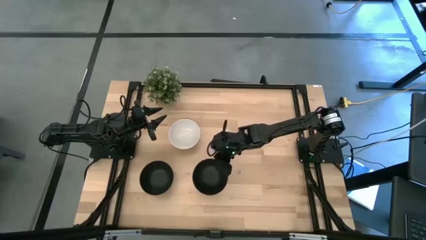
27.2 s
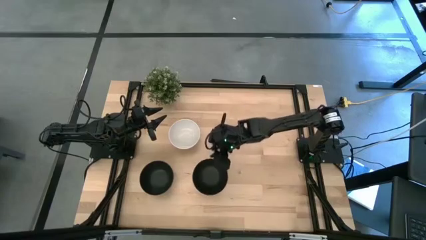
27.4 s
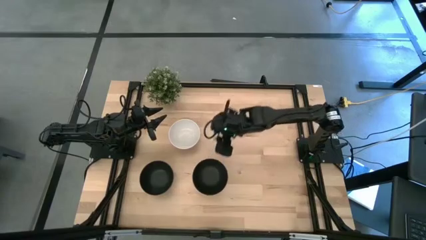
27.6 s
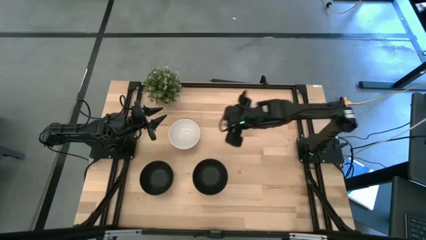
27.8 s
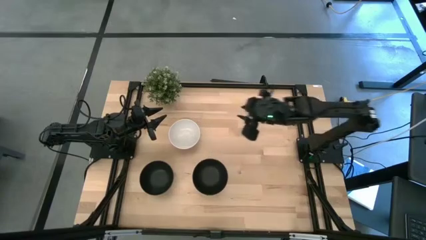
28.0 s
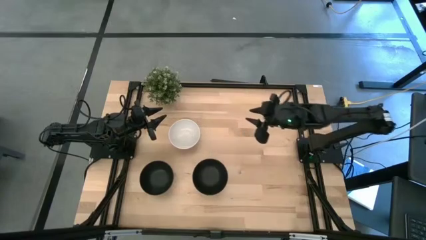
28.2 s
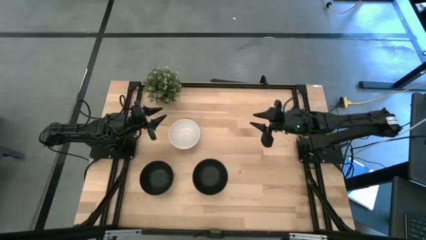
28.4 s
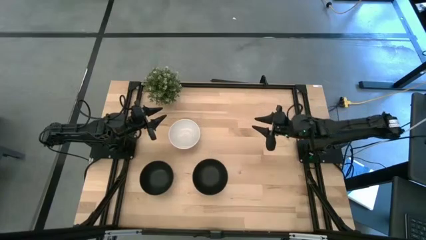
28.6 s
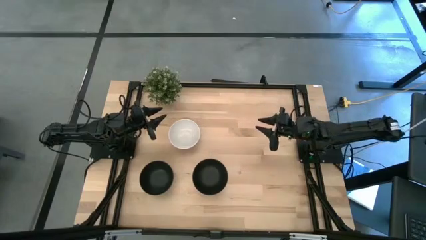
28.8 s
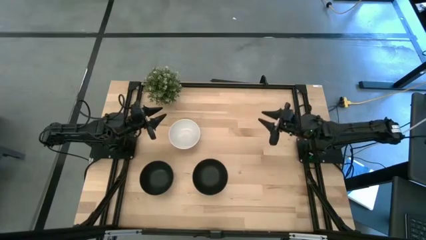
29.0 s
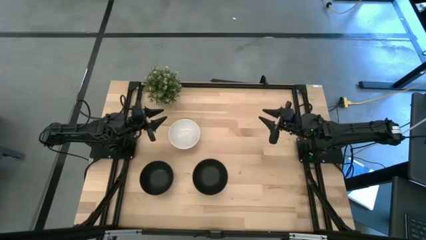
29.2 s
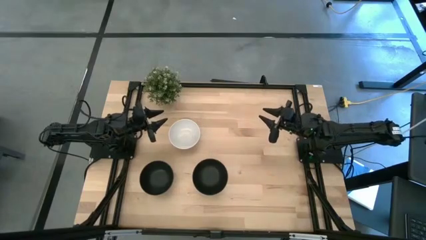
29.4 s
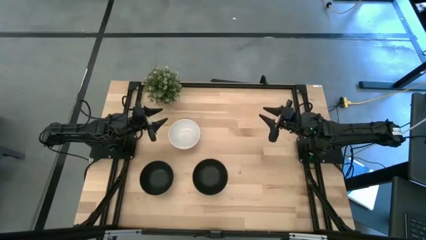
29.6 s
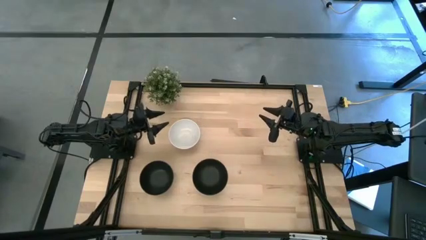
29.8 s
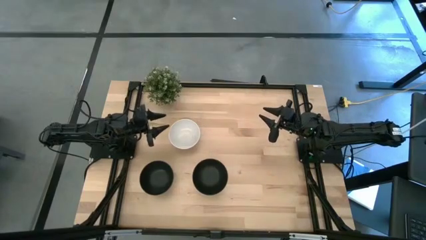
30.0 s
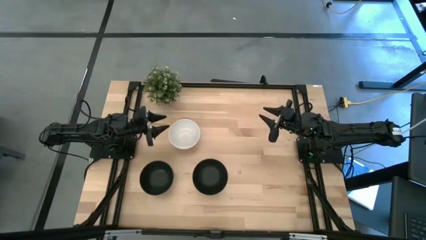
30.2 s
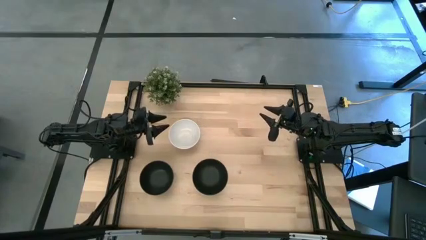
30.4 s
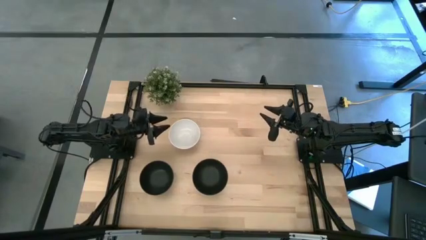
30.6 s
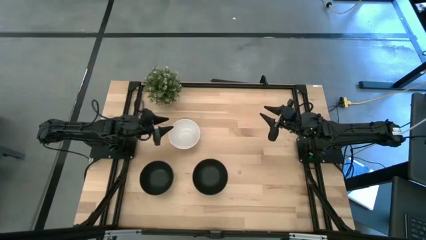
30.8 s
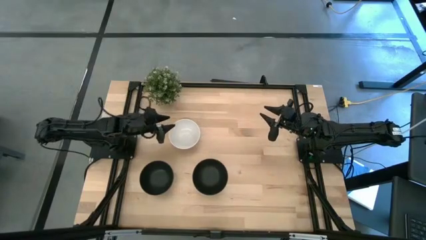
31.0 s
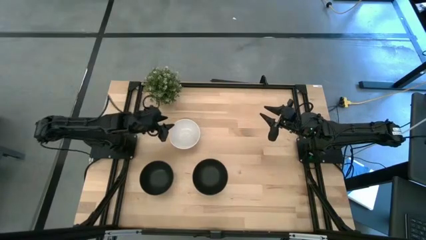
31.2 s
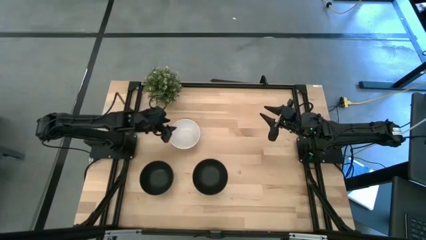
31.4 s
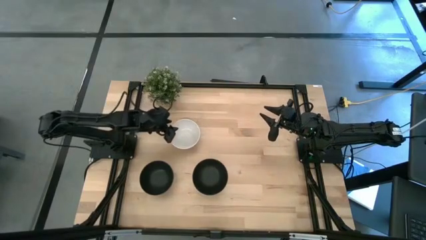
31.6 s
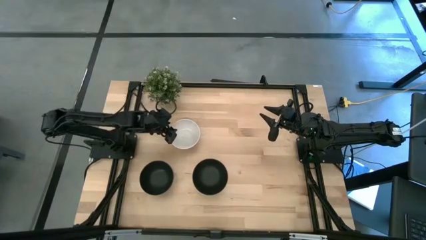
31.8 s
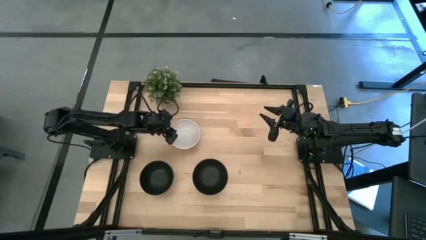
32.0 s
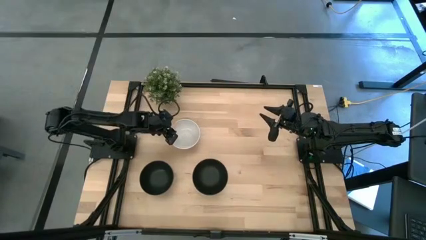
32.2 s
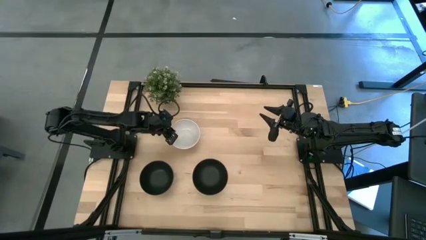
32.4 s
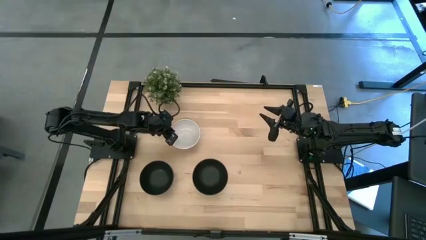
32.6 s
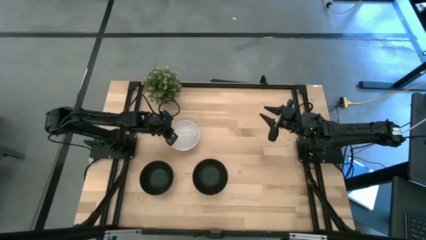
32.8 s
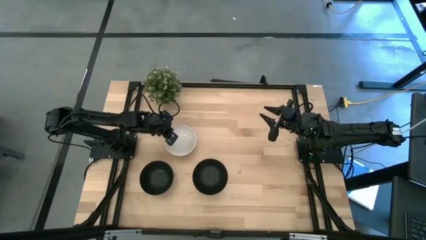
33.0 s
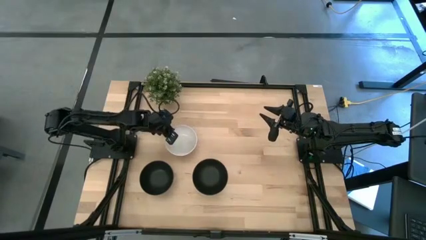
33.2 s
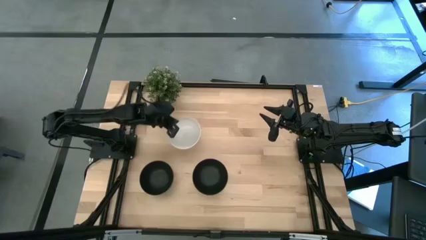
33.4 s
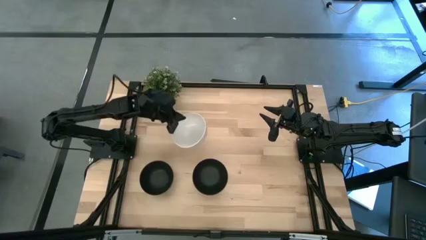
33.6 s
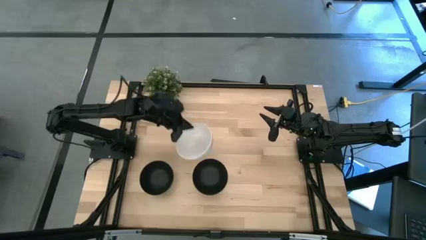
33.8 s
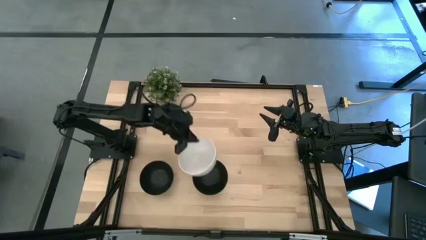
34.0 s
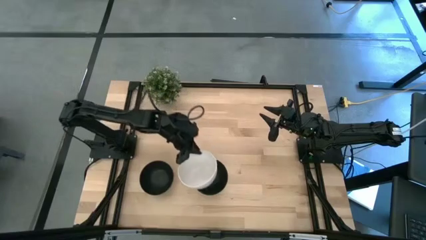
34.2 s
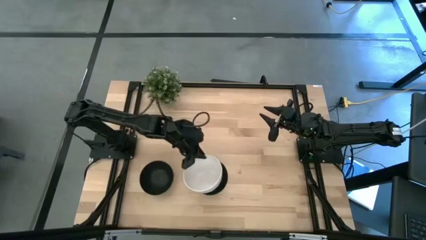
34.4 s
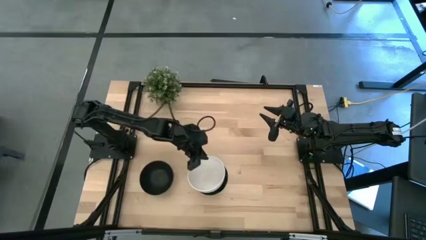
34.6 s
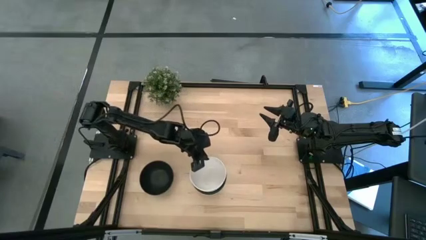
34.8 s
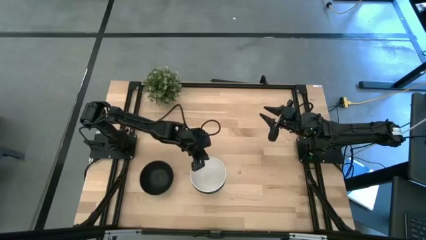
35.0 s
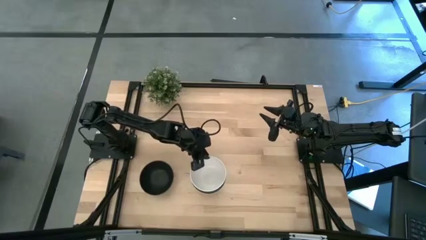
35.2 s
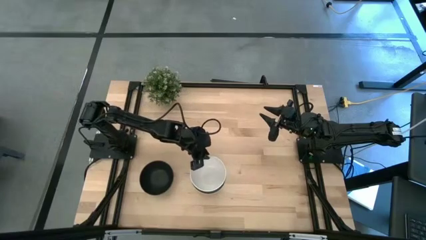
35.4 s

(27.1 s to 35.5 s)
Task: Nest bowls inside each other
Stack the white bowl on the right stacked black bowl

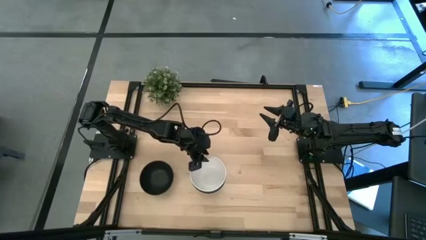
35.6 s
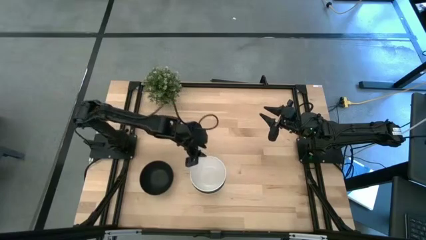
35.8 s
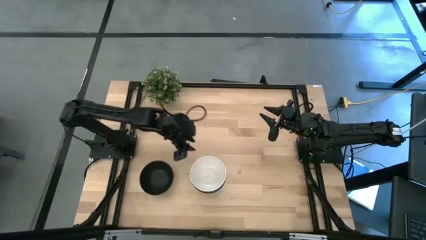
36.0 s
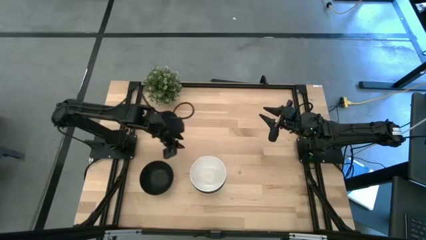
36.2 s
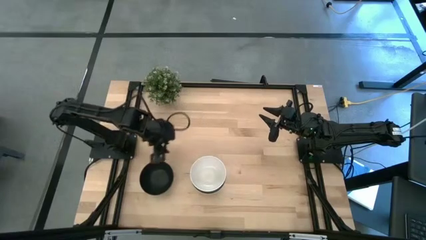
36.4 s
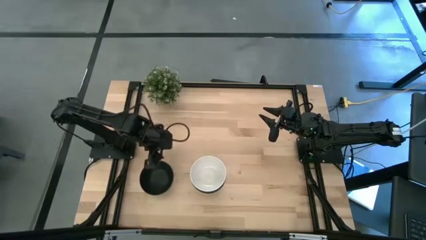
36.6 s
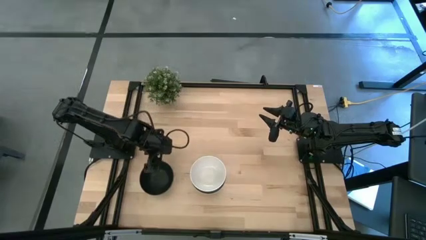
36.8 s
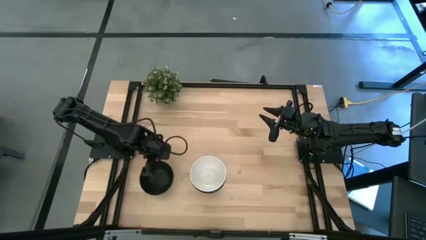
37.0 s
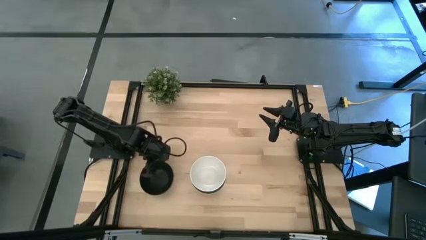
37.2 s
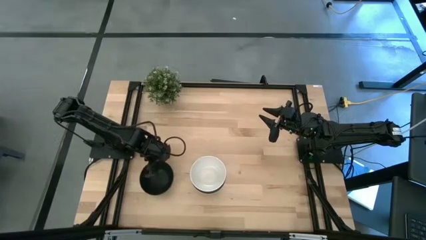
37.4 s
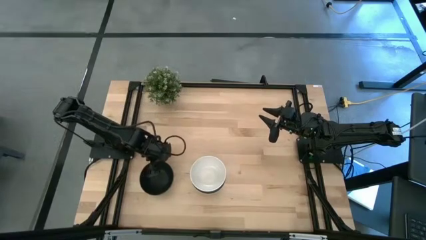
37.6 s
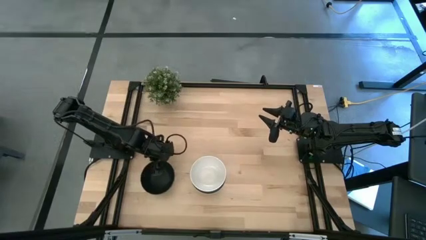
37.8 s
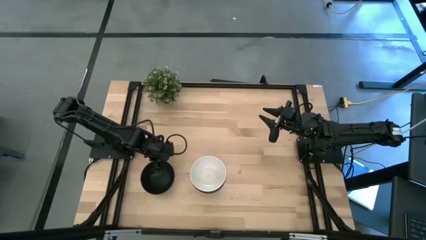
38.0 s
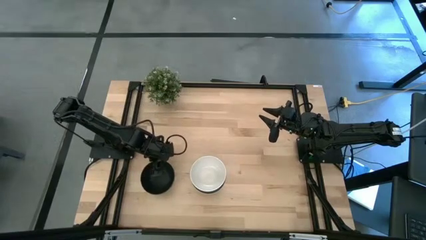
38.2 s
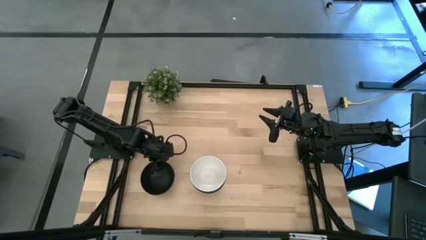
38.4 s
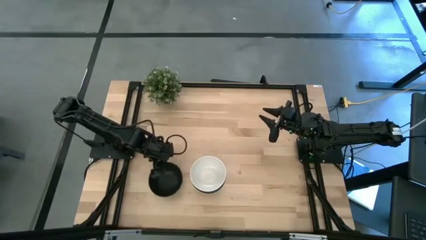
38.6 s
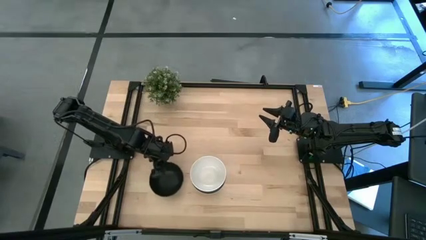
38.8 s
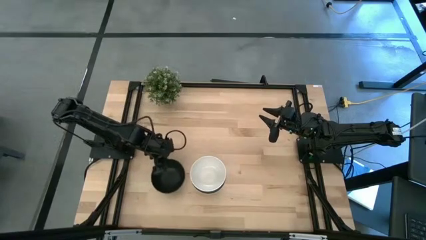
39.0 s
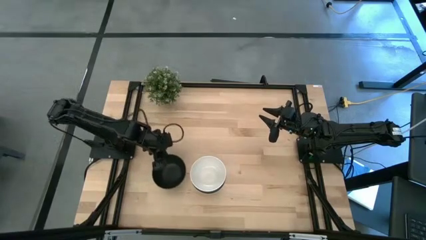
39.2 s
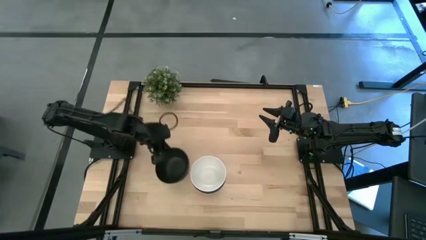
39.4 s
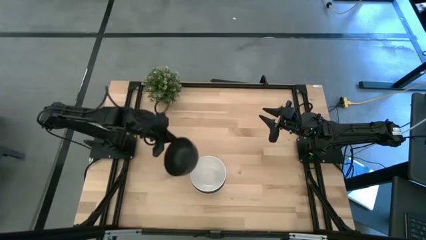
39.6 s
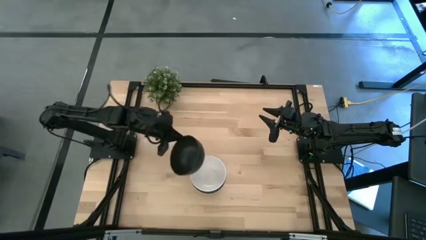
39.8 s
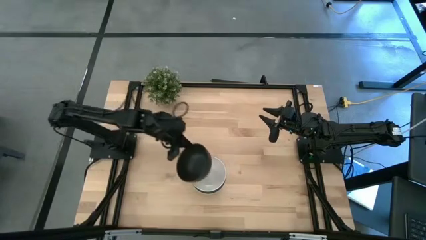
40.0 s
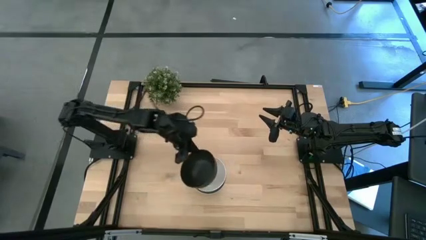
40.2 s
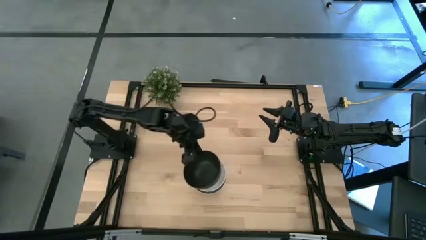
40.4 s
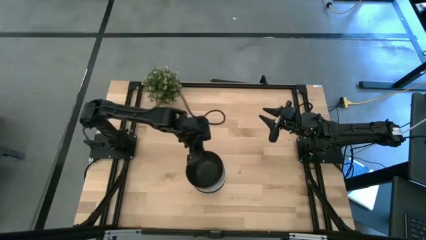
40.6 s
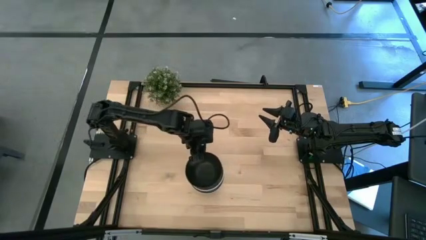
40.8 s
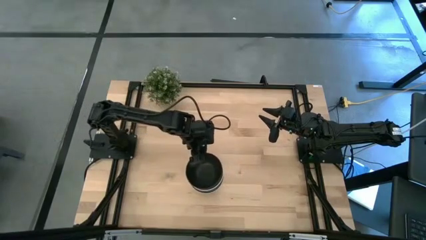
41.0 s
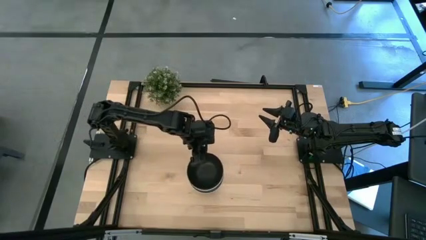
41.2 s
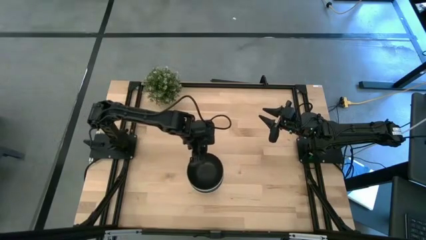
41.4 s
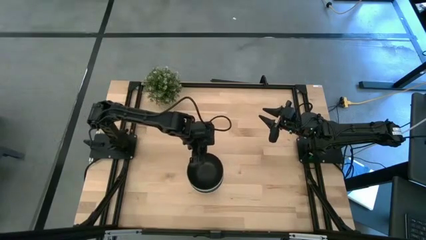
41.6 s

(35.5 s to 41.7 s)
Stack the black bowl on the white bowl

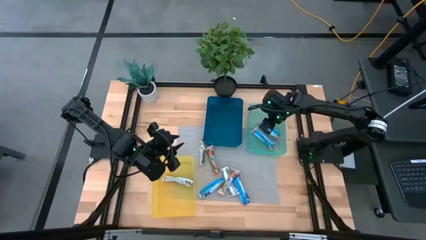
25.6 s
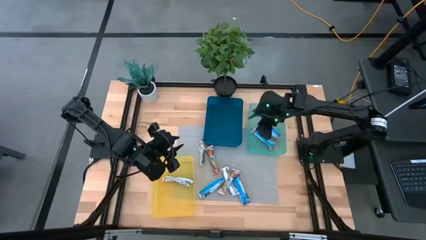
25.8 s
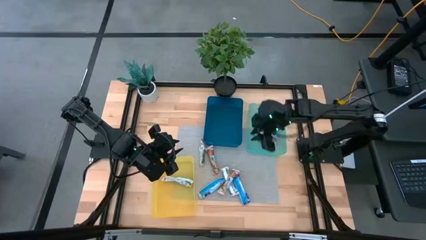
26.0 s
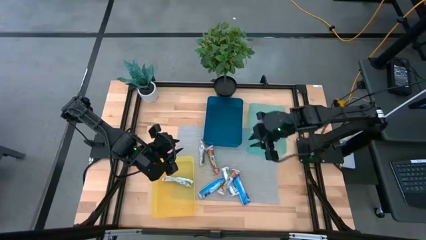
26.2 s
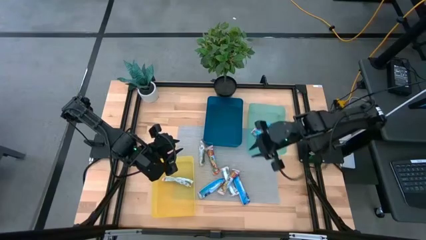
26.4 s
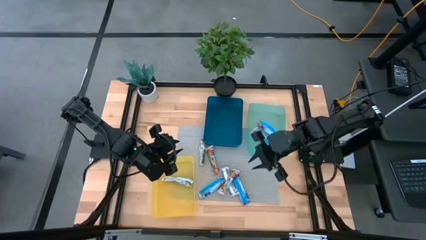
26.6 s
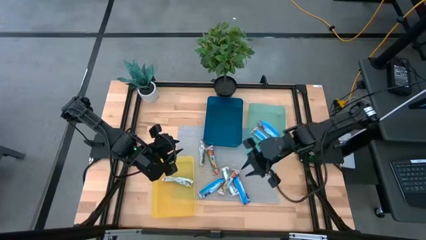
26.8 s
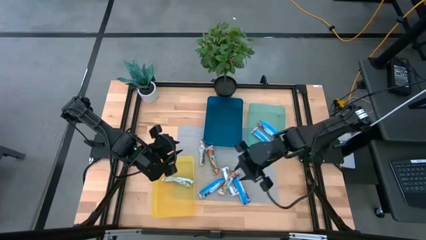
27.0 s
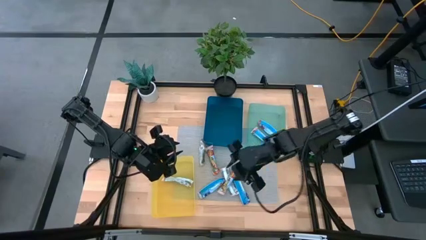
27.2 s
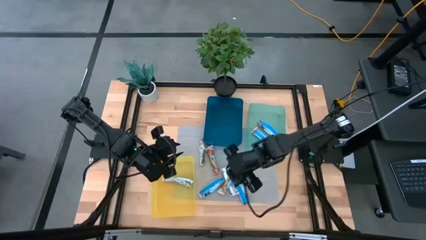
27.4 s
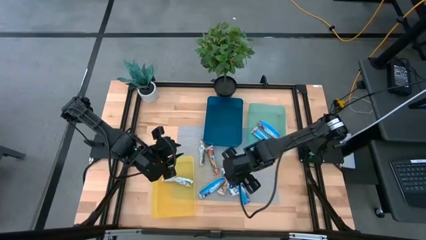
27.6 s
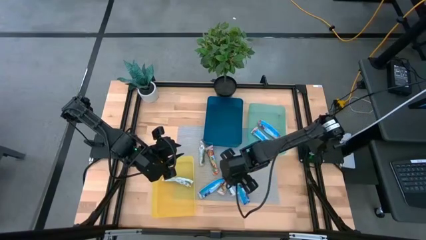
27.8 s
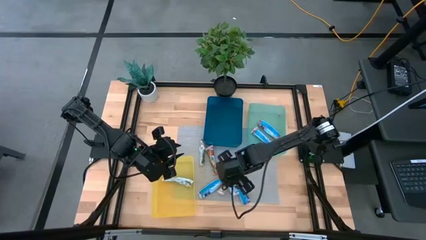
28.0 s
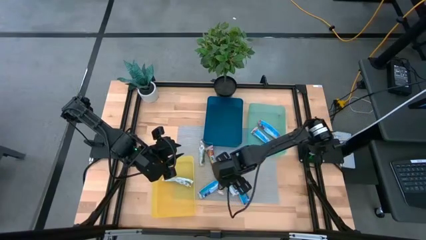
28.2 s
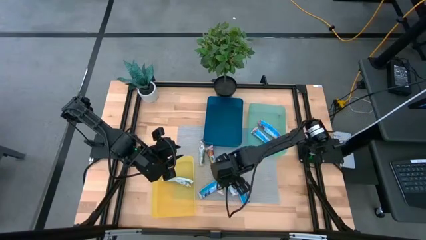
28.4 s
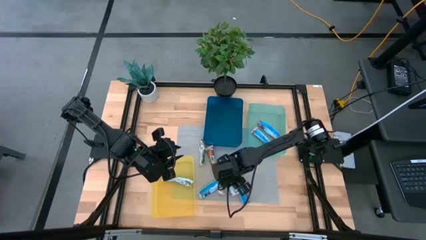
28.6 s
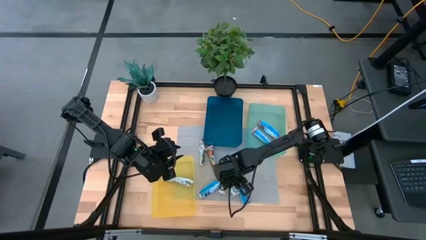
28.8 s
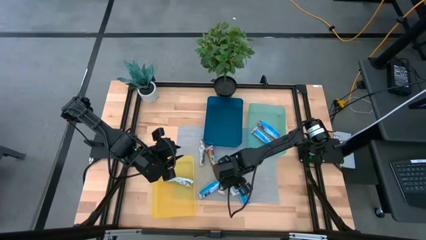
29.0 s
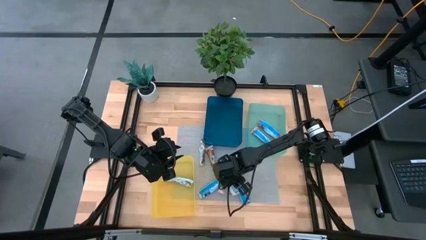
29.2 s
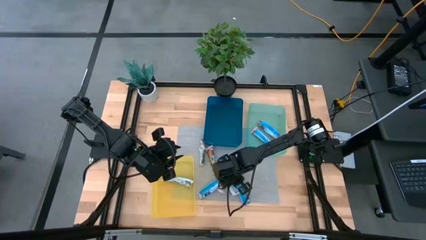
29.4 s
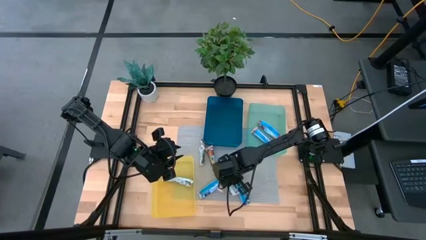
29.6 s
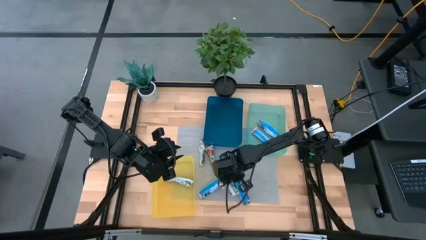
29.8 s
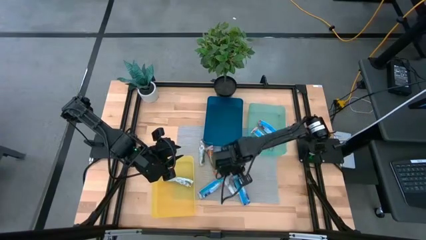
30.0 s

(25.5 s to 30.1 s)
Task: Pick and place Granola Bars by type
Put the red granola bar into the green bin
